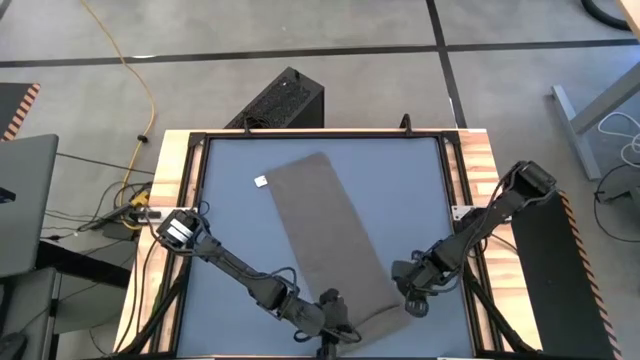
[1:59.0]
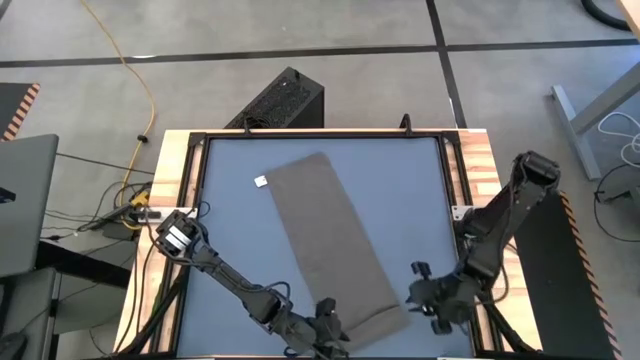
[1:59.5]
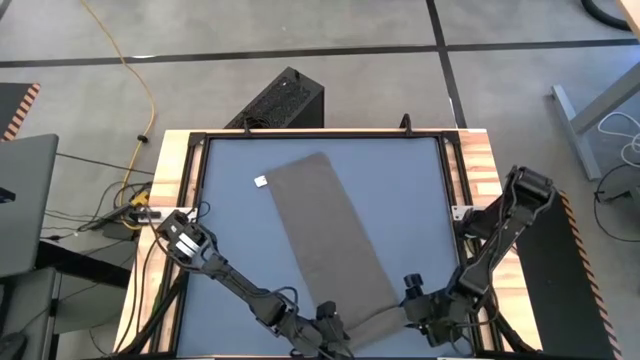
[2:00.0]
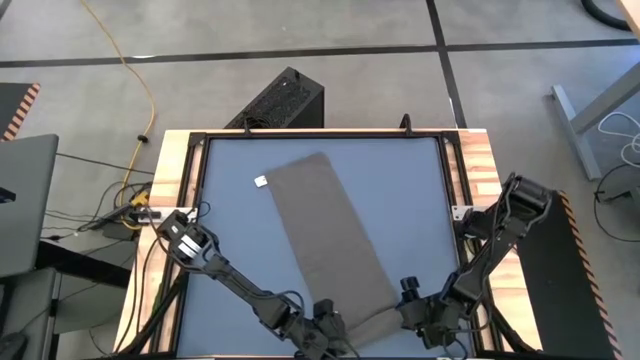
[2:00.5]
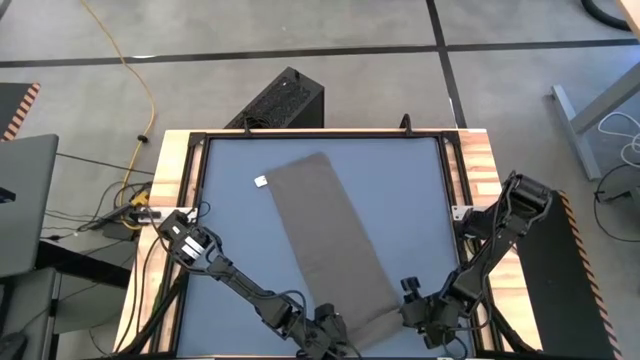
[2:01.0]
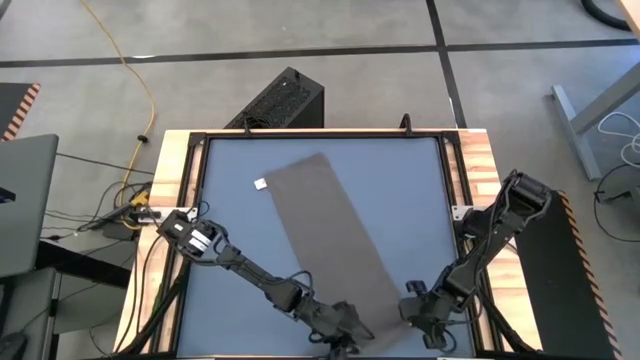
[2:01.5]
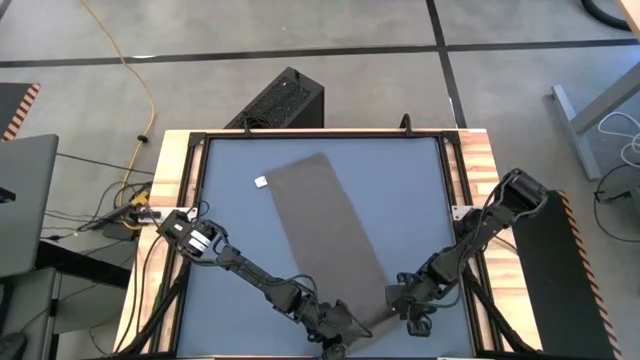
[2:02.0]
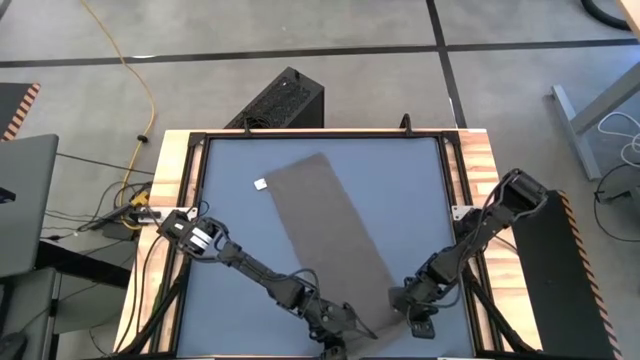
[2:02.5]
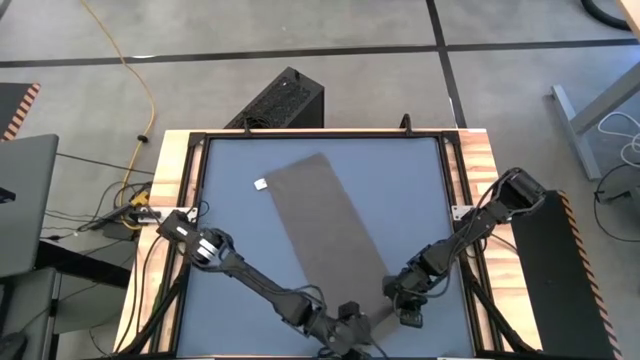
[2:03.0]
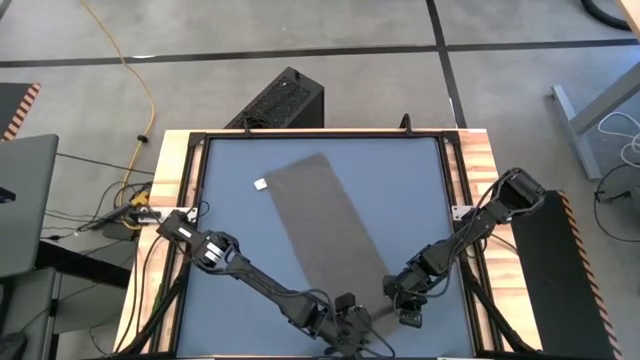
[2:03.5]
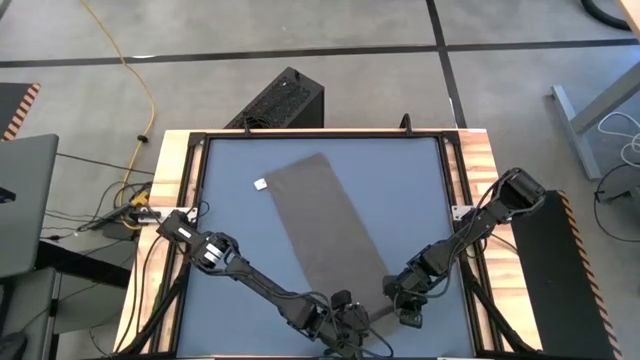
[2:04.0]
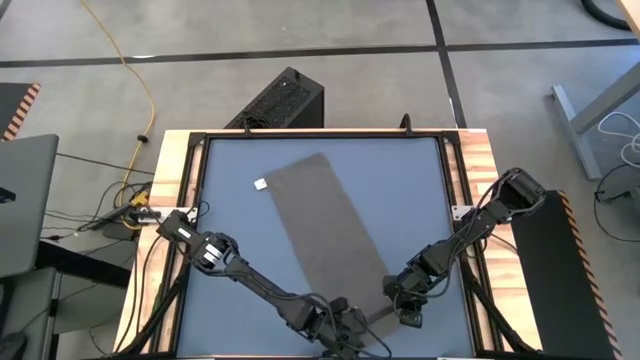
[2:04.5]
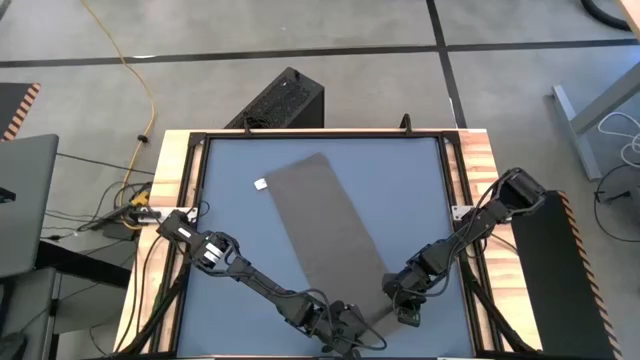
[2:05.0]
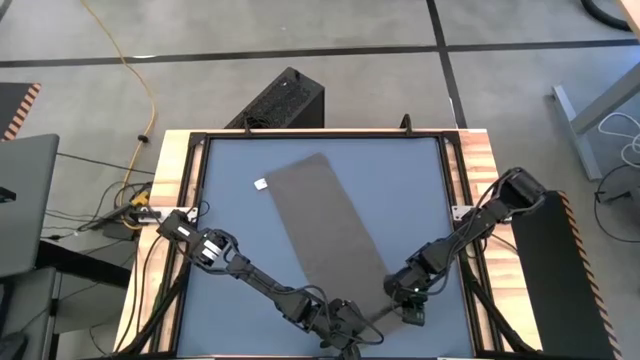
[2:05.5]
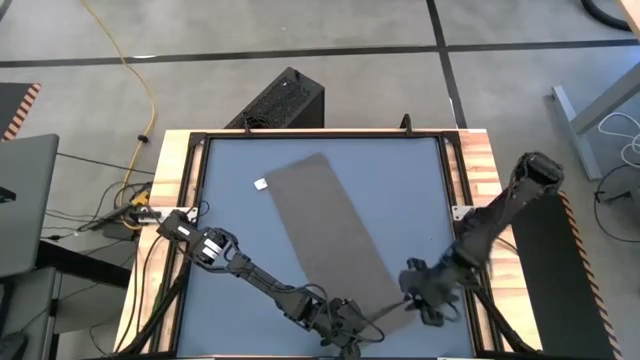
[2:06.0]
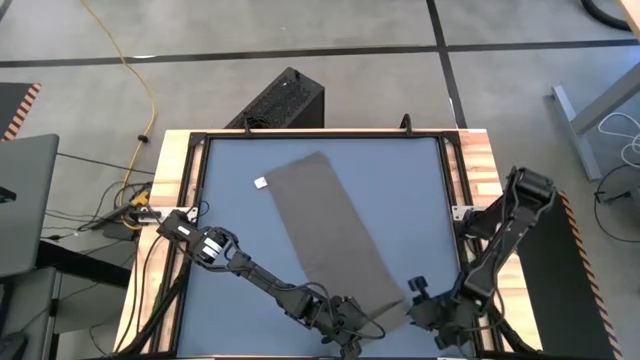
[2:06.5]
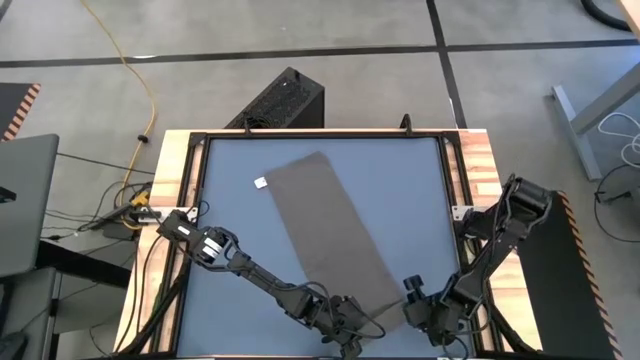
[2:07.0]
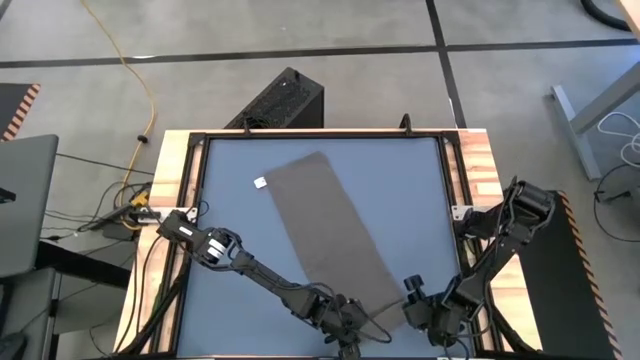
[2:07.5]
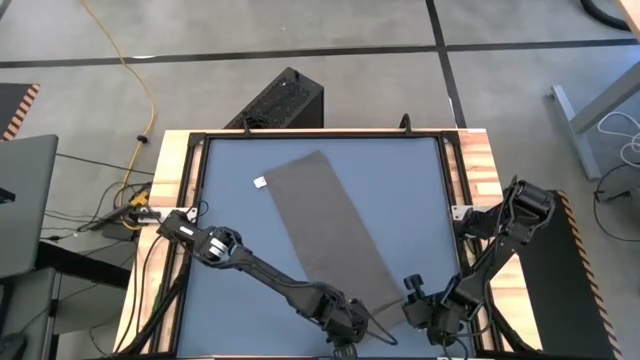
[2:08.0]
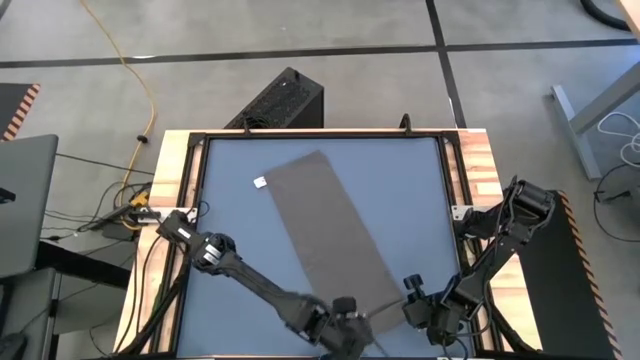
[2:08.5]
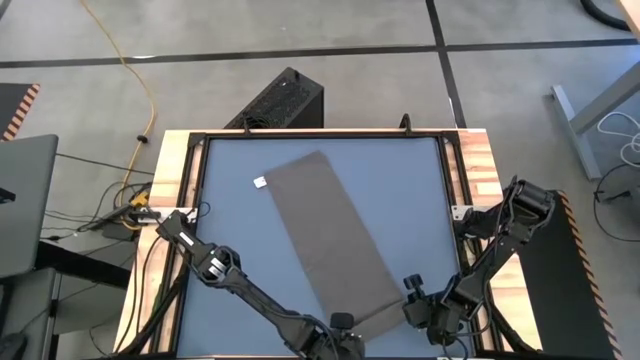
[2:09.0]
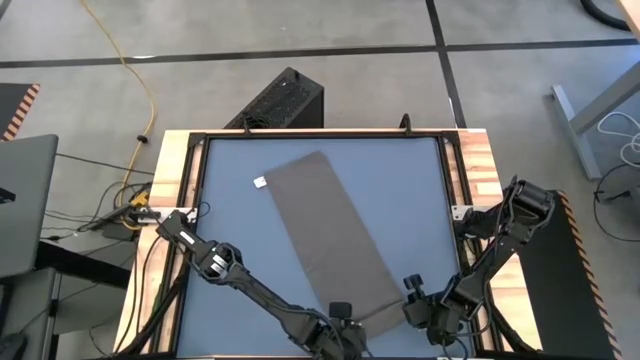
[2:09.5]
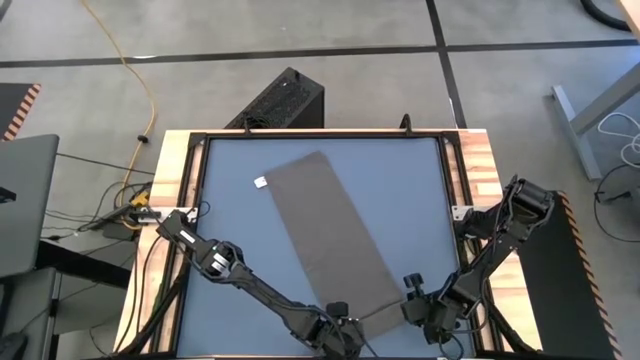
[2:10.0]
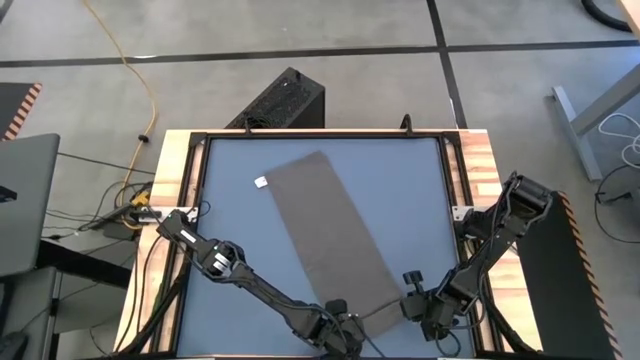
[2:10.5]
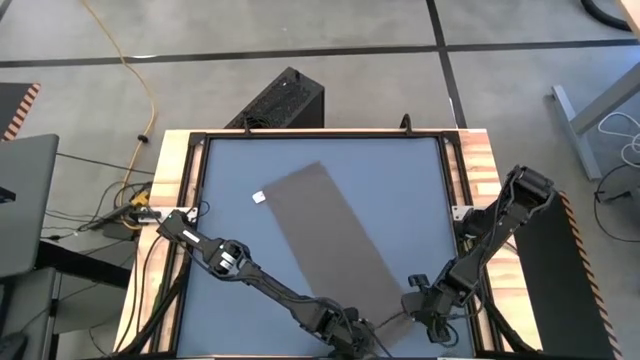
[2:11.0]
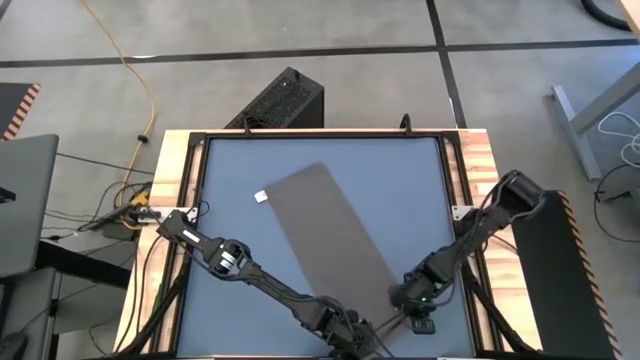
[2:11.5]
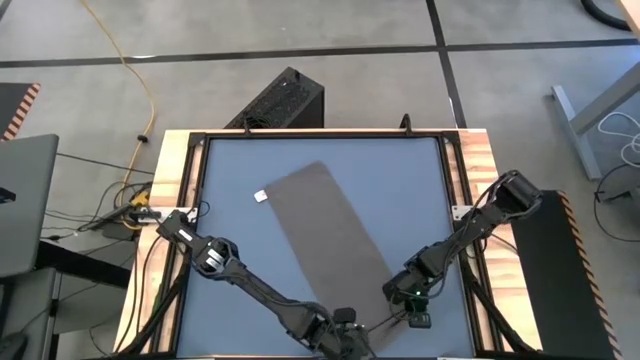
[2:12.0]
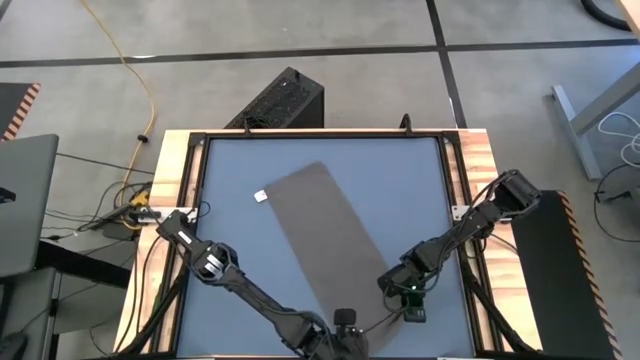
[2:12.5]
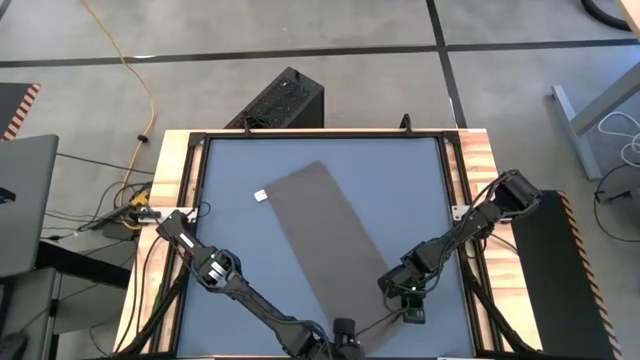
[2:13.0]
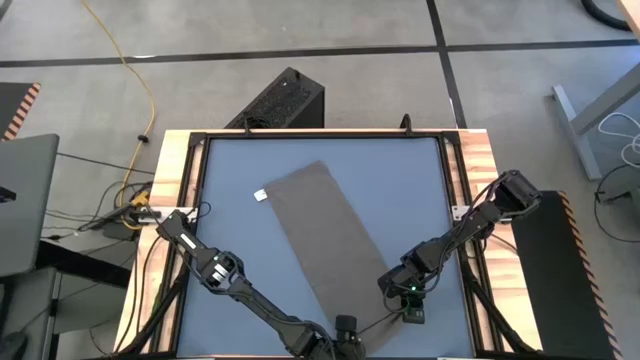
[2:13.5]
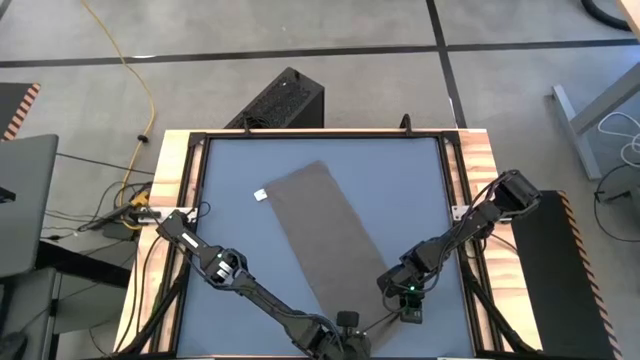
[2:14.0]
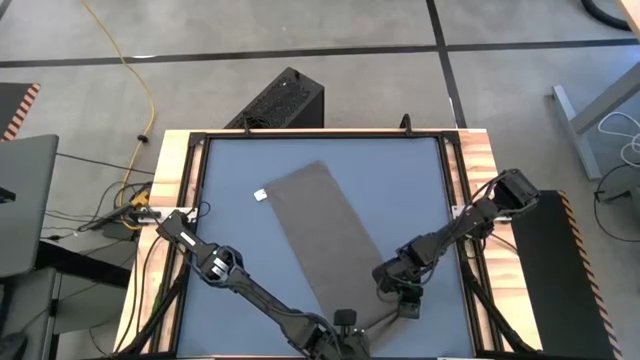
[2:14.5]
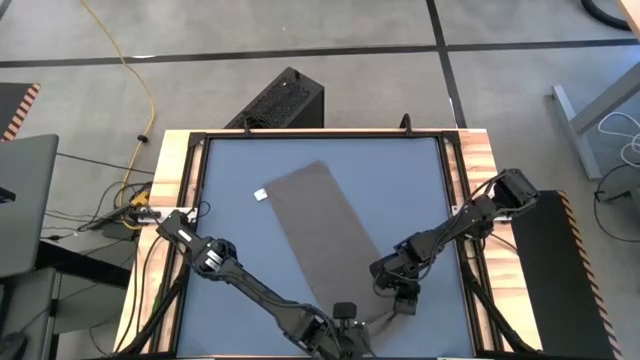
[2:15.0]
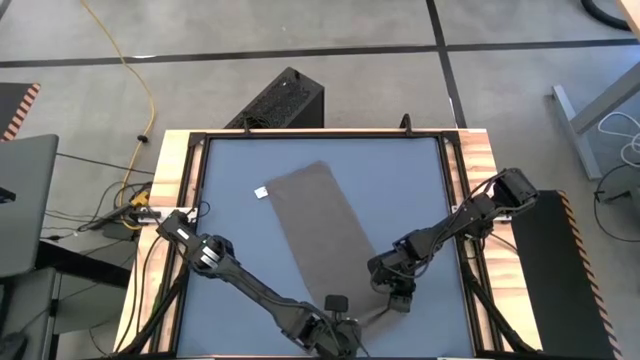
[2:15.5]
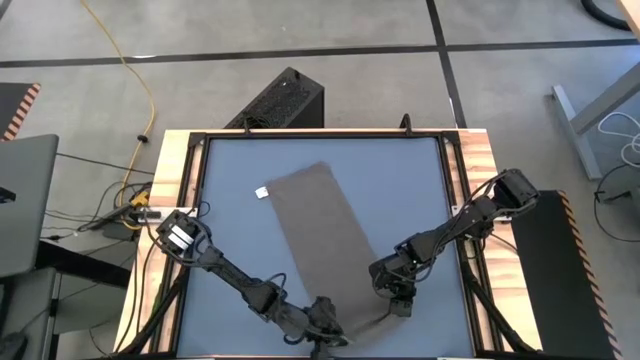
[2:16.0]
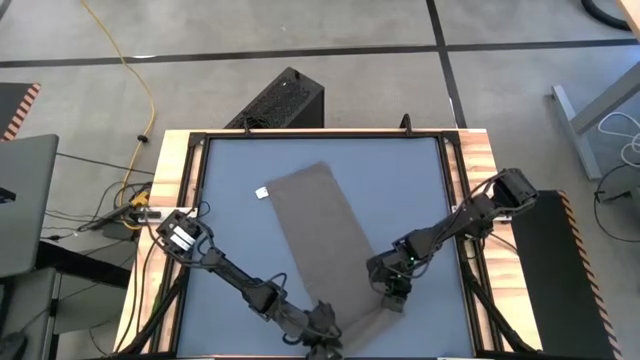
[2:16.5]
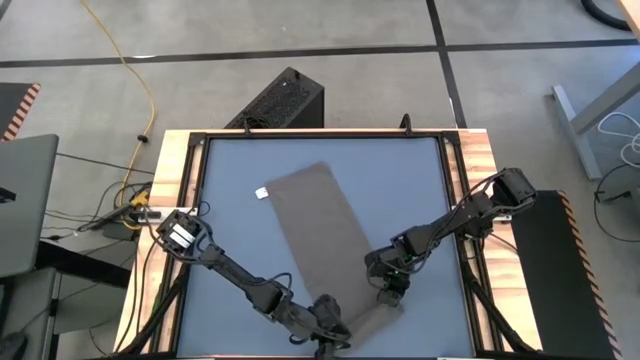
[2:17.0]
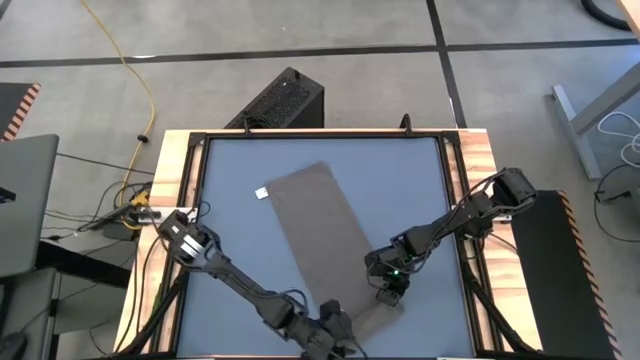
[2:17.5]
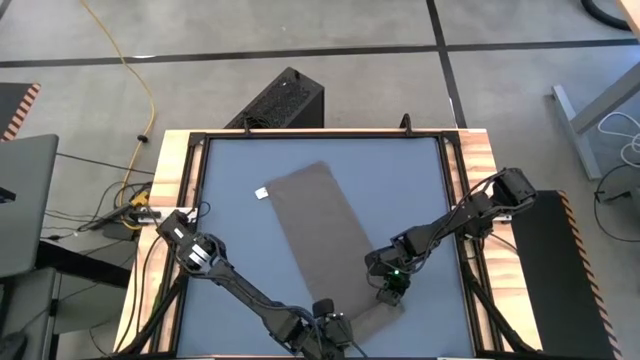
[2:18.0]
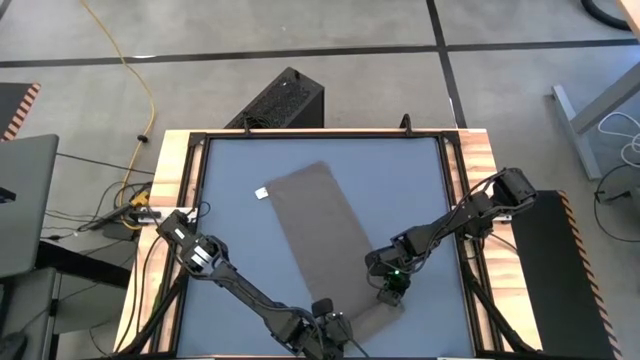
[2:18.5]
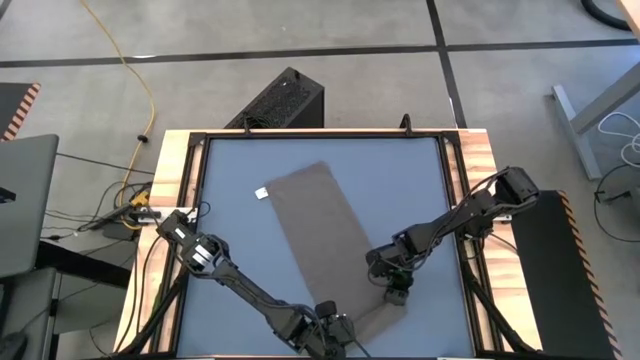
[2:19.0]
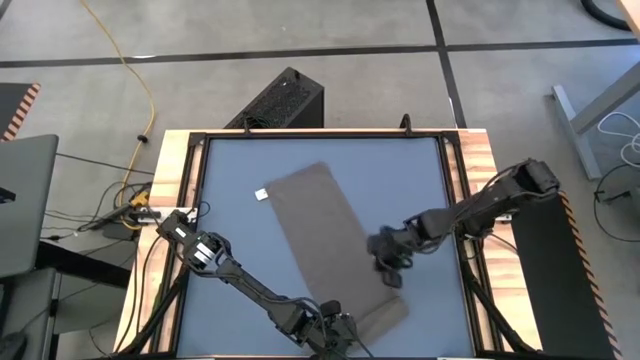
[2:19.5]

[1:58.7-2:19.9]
Task: Roll towel into tight, uniform cylinder
Roll the gray towel

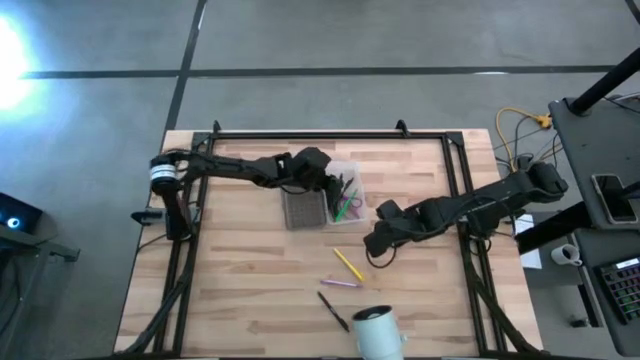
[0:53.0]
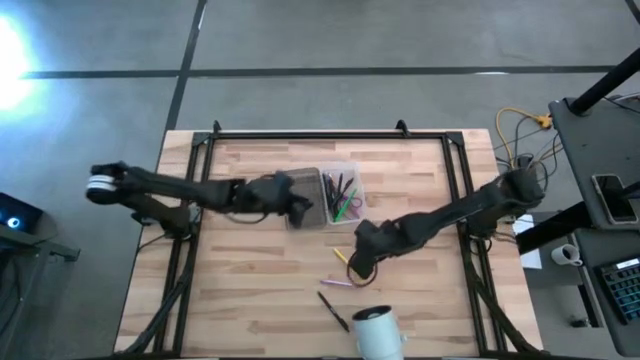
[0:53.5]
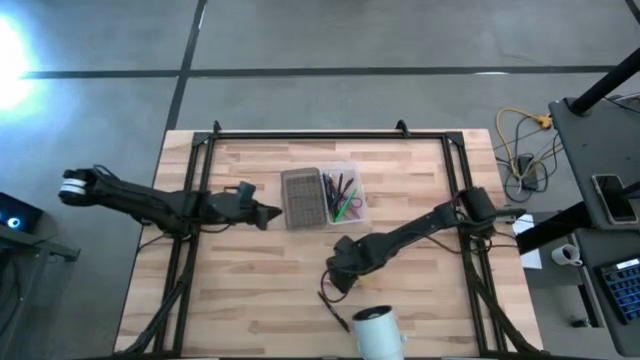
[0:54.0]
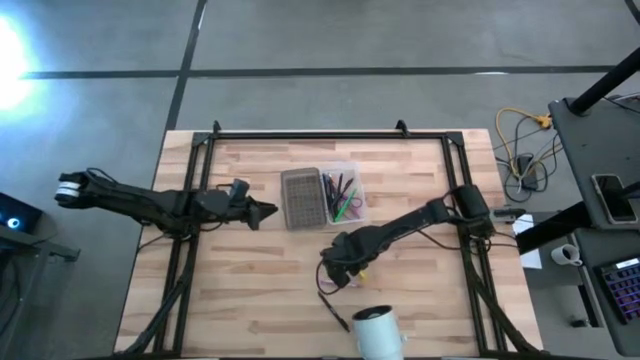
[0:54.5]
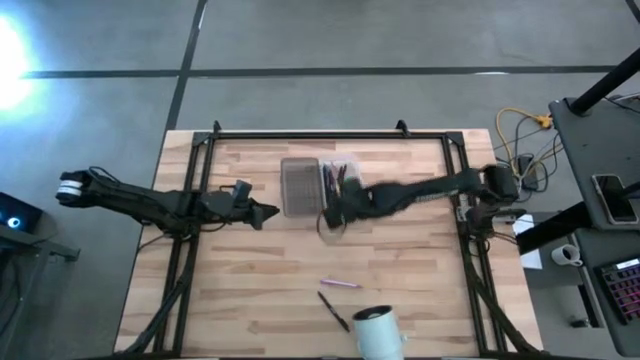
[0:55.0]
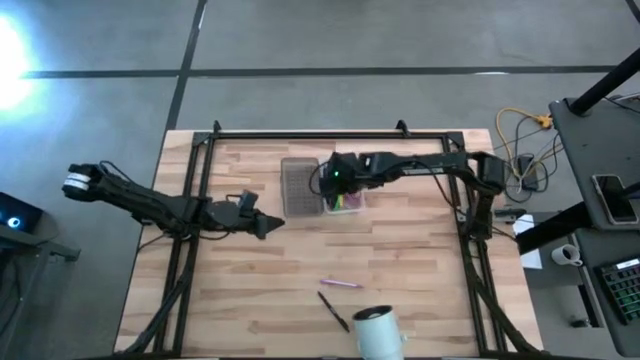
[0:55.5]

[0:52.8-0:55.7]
Task: Pick & place school supplies into a supply box
Put the yellow pen into the gray supply box
